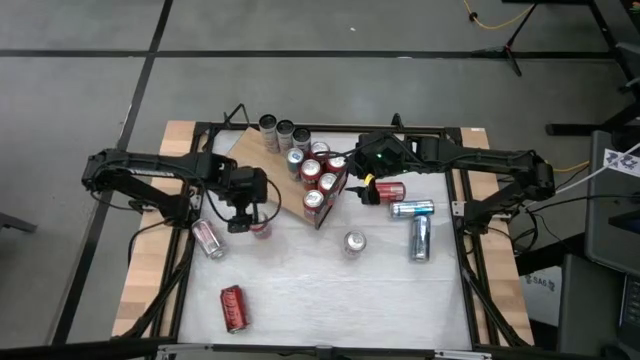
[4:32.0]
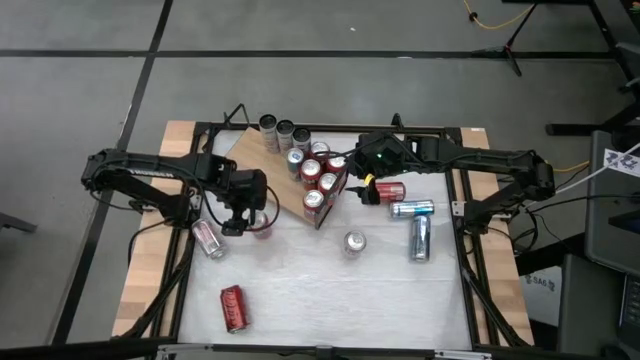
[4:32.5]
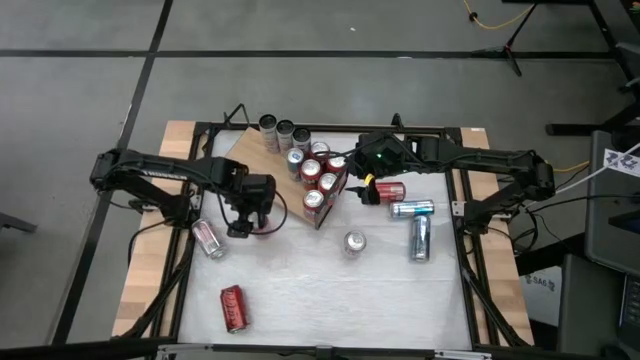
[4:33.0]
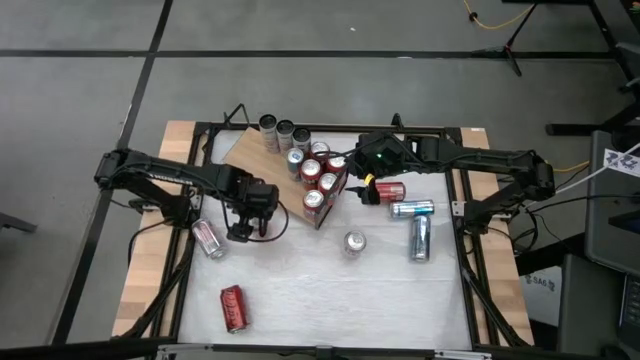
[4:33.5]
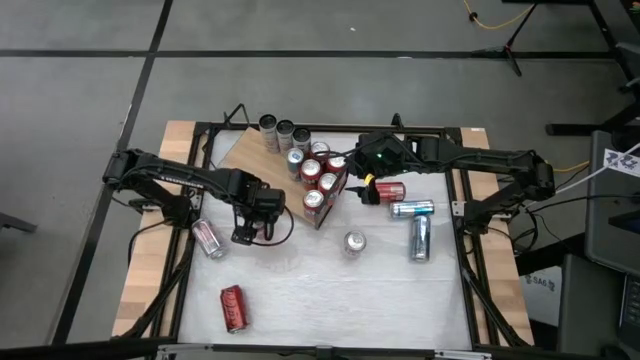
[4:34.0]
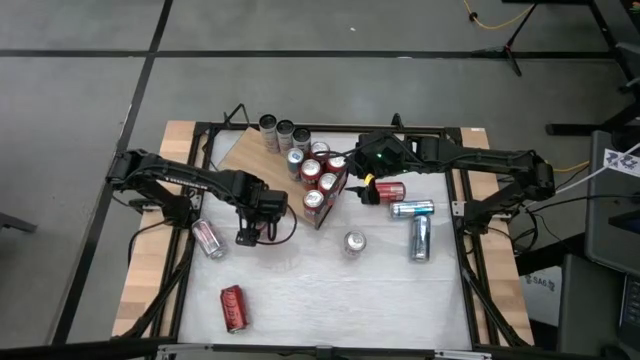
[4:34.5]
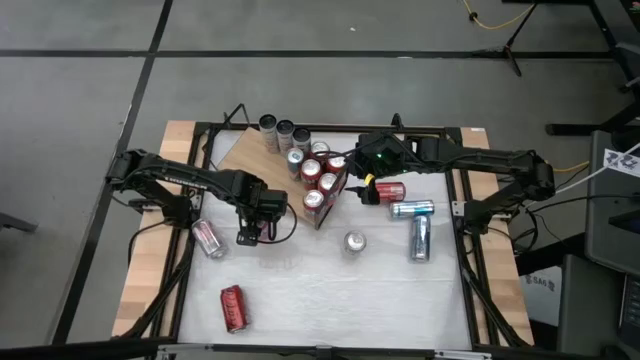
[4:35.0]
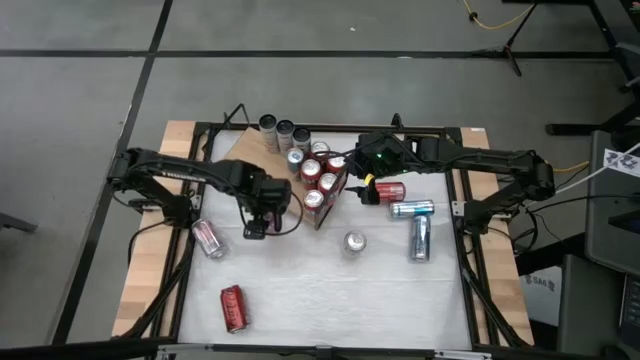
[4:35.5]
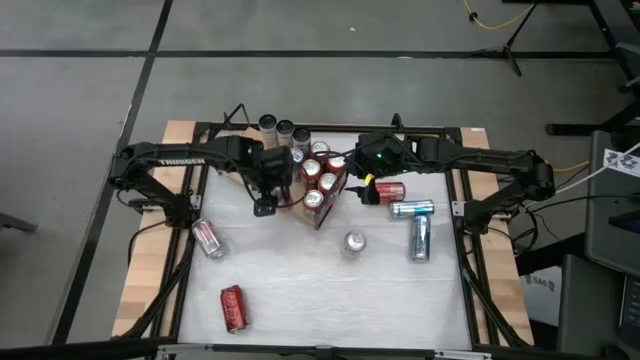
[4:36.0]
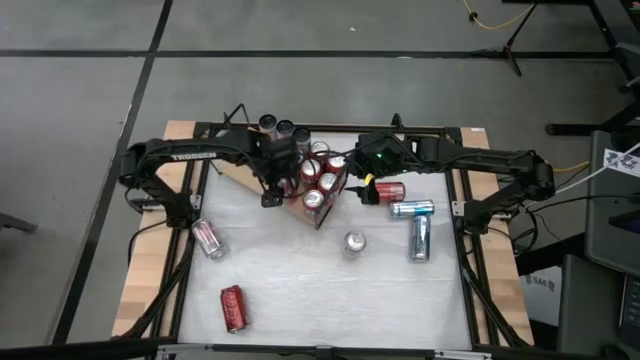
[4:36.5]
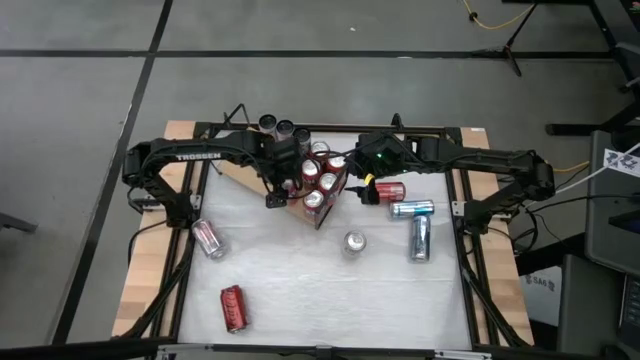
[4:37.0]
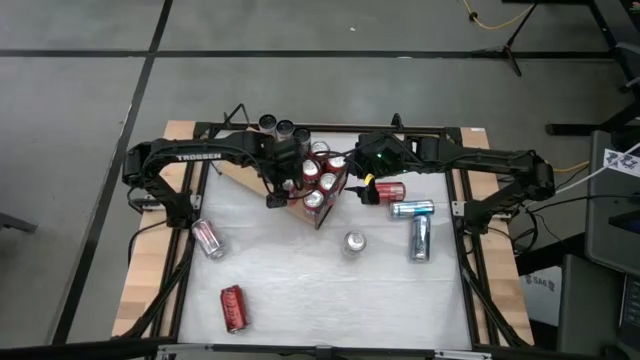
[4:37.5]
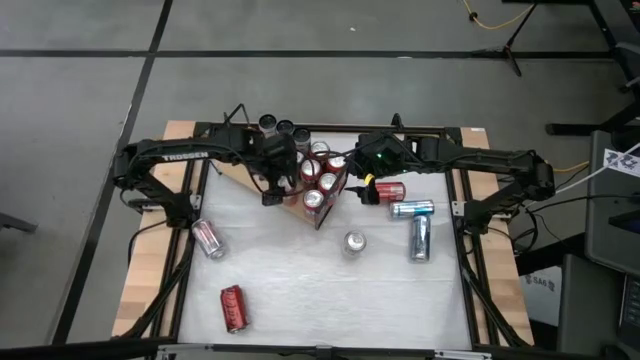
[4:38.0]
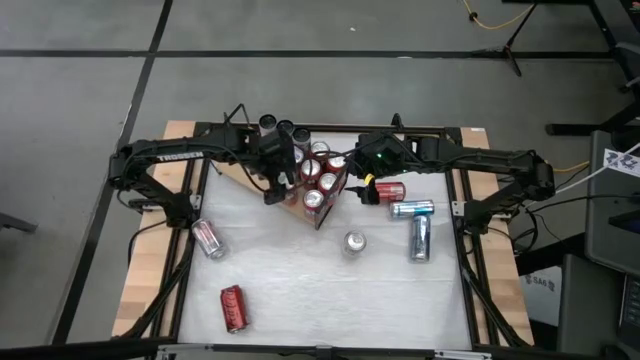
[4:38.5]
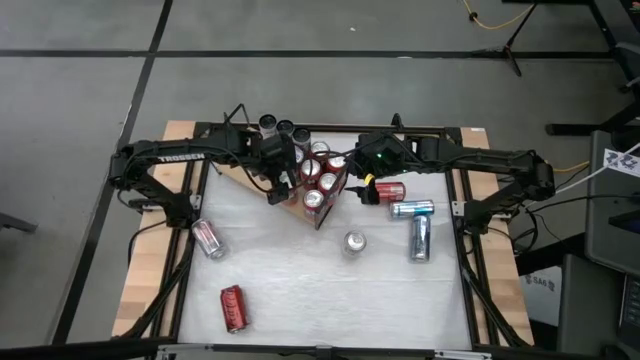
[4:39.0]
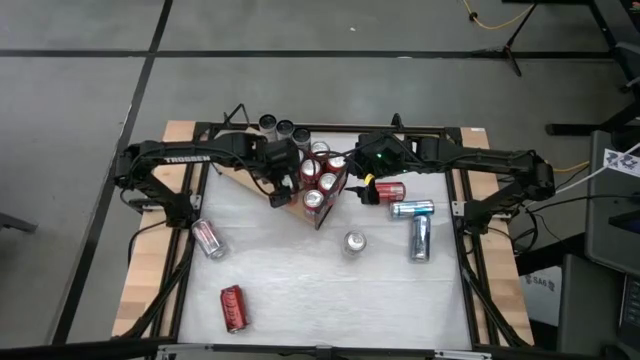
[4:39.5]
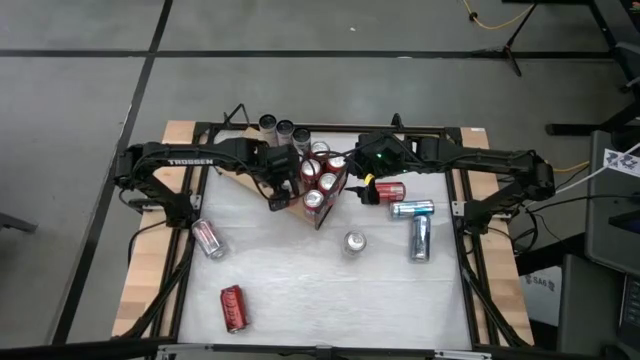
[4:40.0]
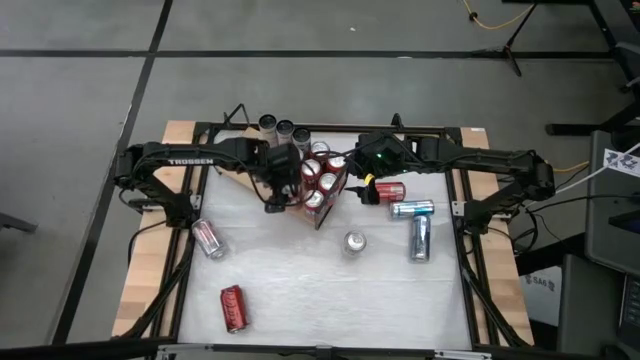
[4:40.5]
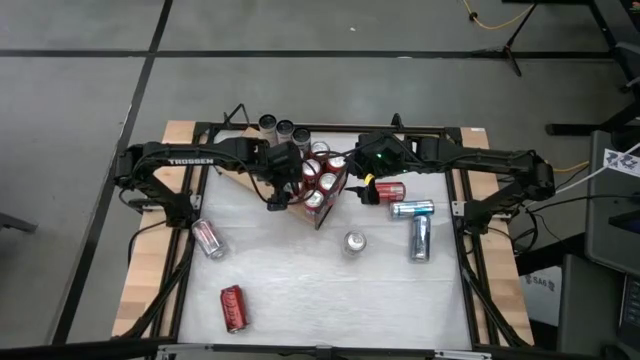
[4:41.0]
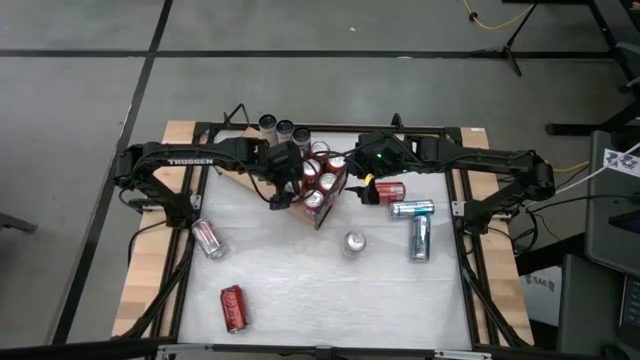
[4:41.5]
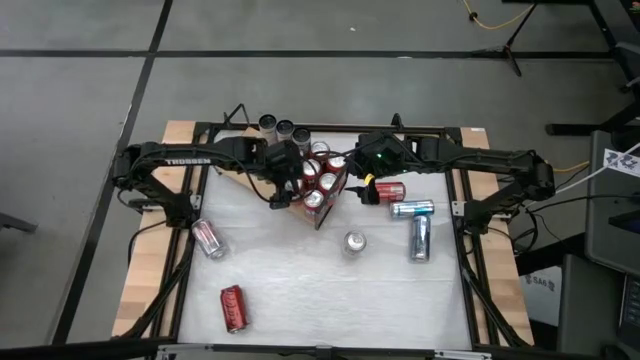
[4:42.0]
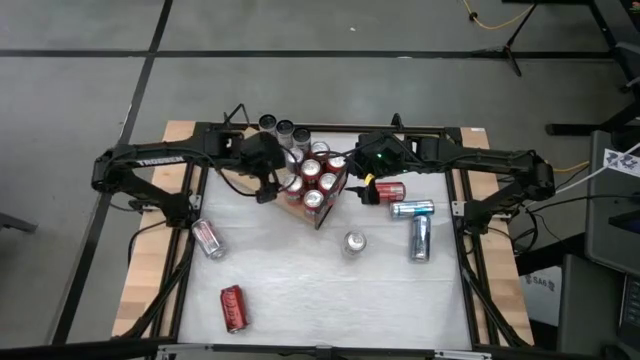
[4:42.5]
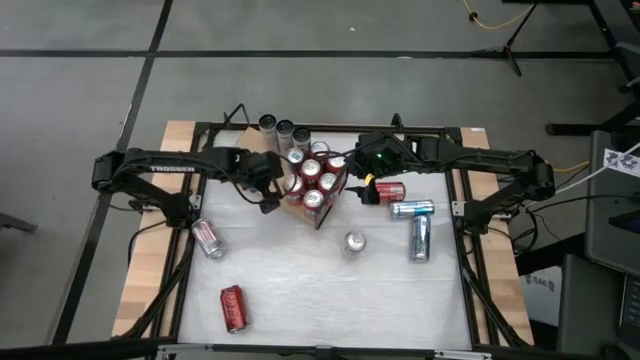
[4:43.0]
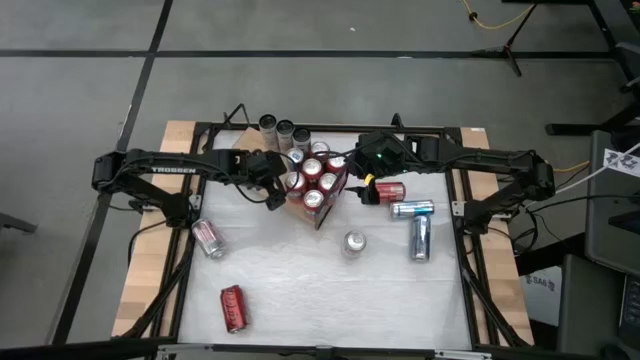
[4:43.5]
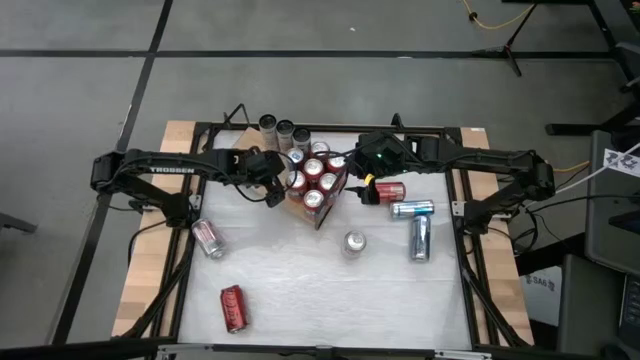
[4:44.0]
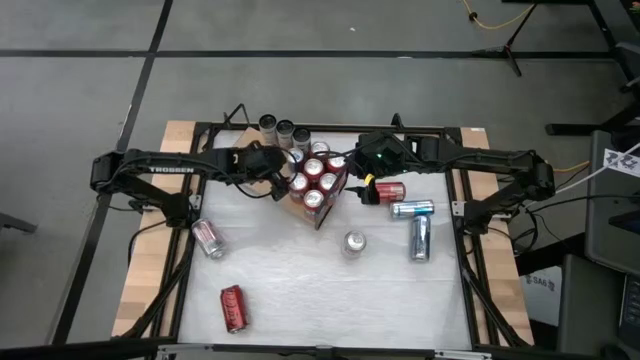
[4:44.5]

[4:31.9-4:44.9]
Task: Pick and place cans onto a shelf
Put the red soda can on the shelf and align with the other red soda cans

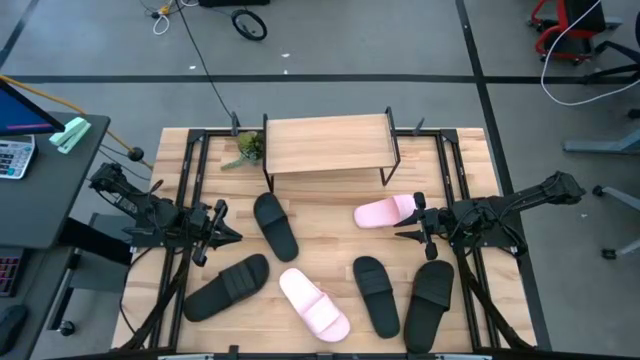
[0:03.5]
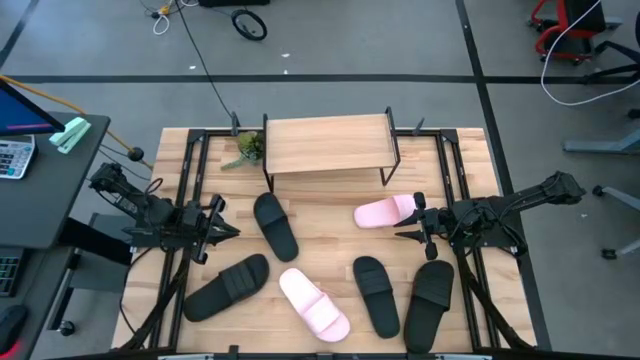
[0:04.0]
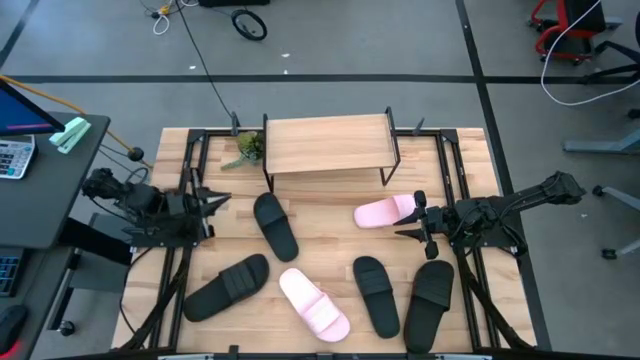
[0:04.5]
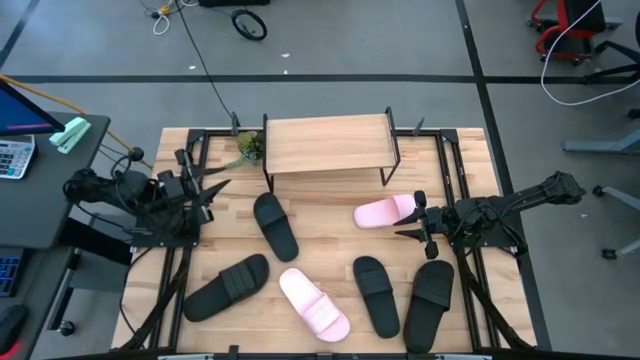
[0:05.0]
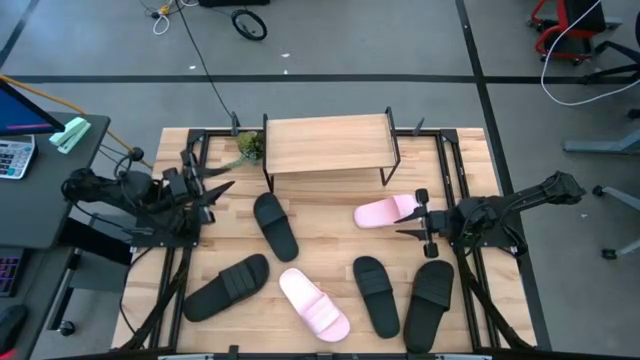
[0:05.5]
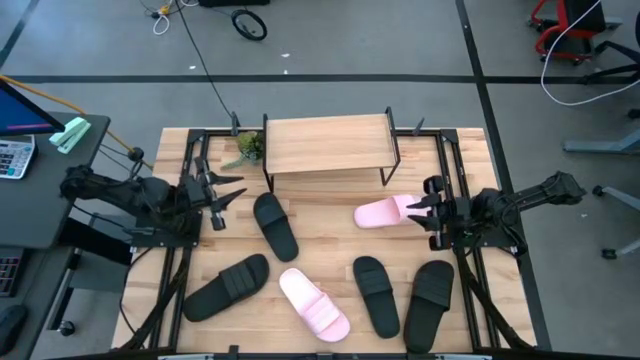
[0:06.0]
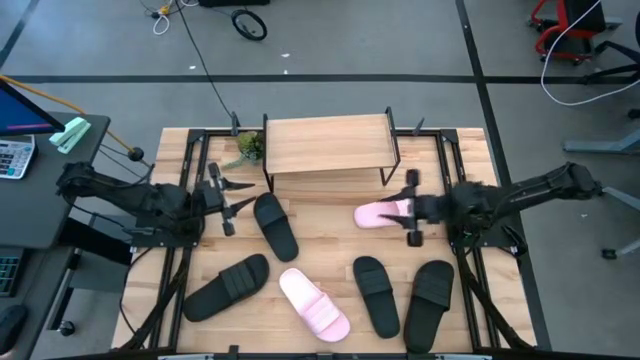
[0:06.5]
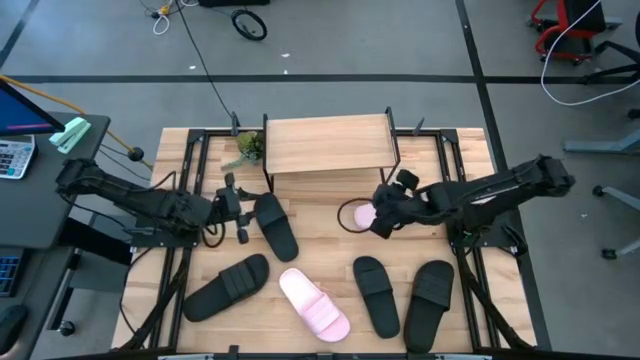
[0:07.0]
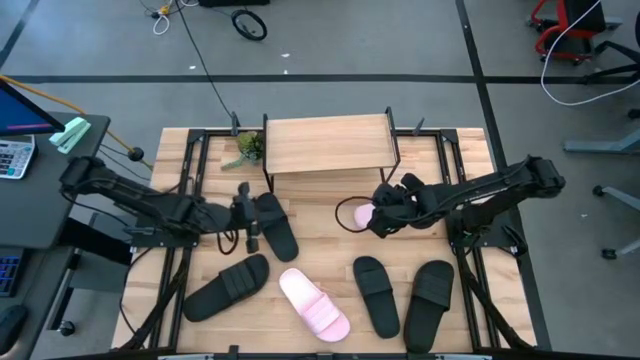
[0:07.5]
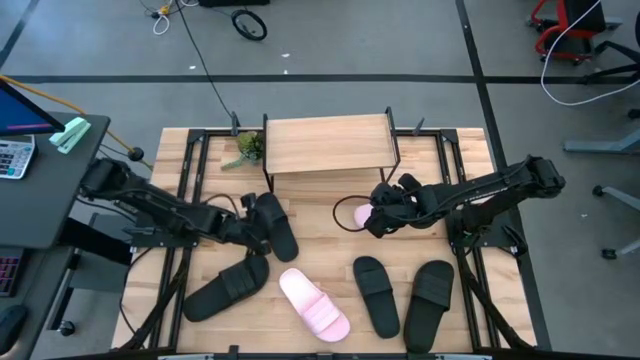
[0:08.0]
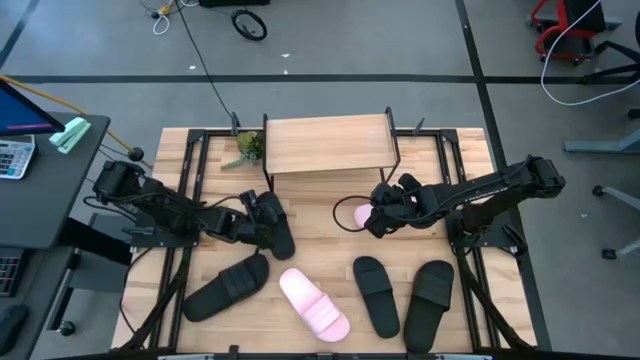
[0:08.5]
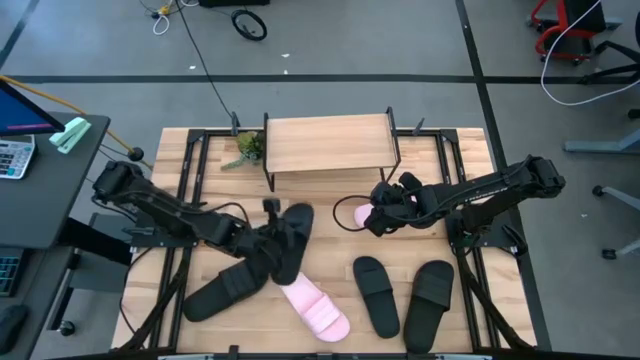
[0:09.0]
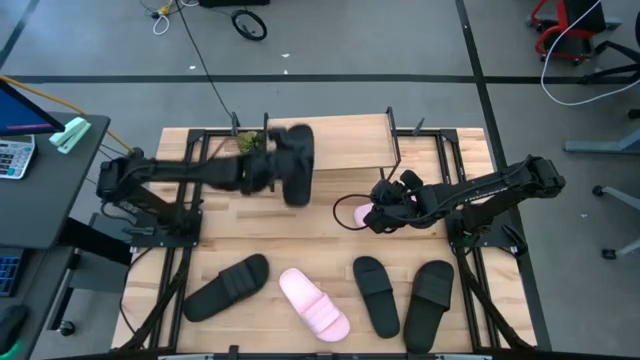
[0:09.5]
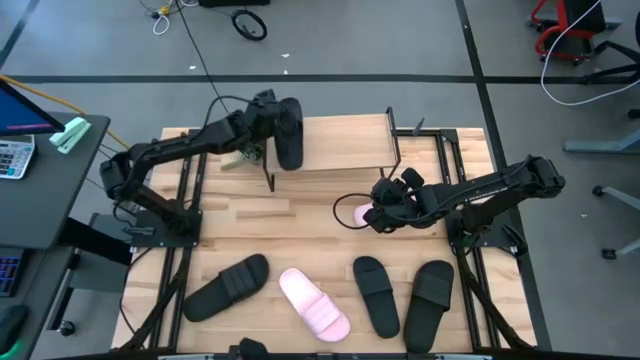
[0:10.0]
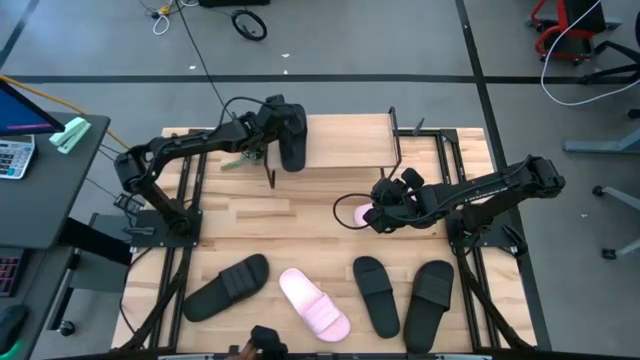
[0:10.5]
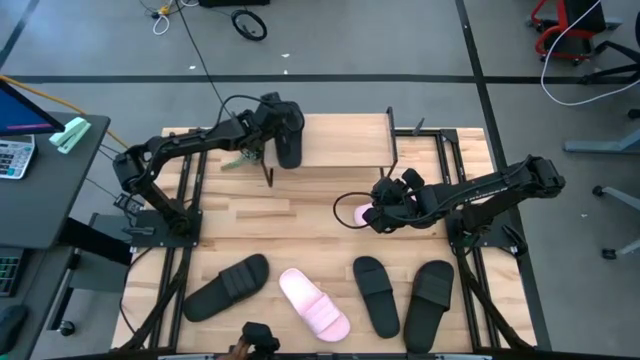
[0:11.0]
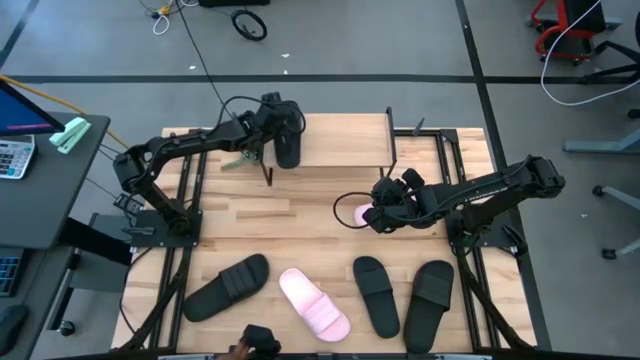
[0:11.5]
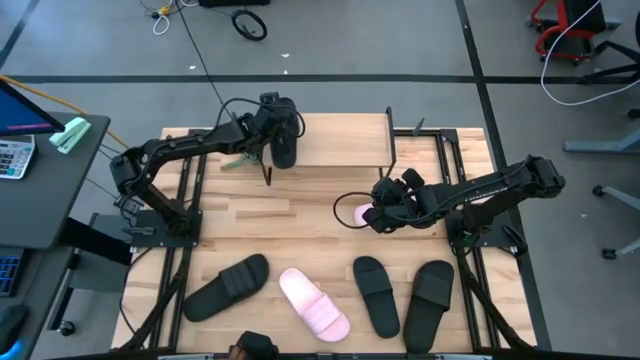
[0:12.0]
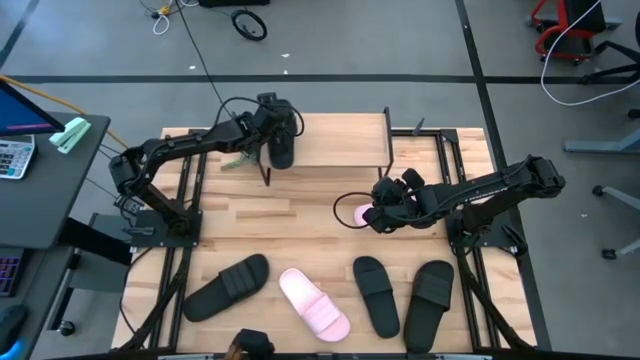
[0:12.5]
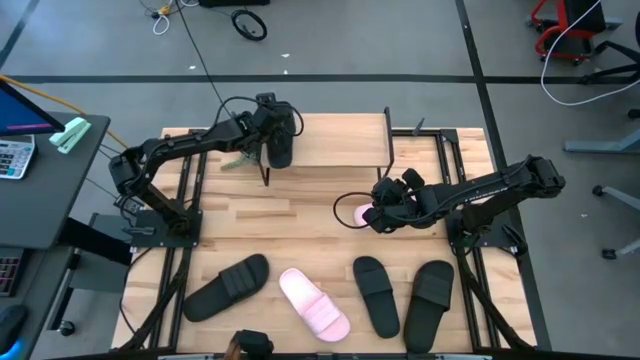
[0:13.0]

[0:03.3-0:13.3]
Task: Pick and place slides into the shelf
Put the black slide on the shelf
